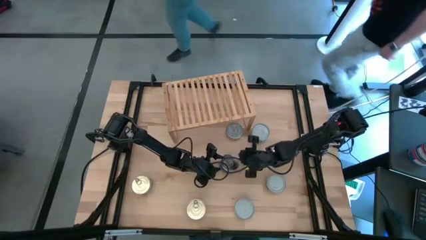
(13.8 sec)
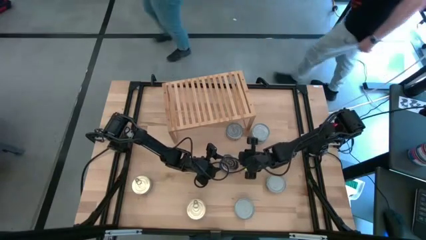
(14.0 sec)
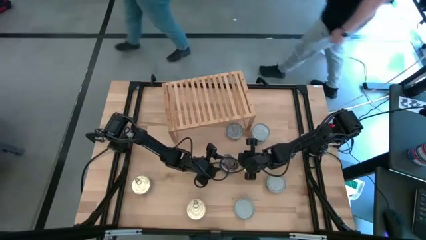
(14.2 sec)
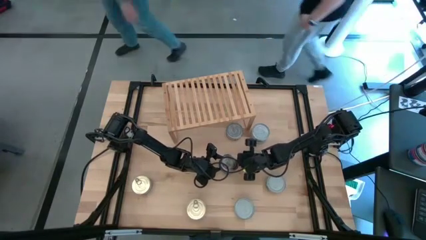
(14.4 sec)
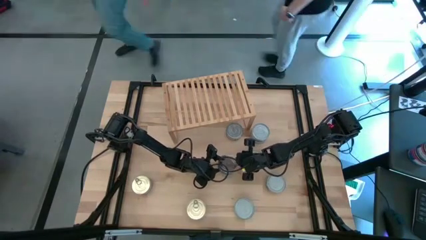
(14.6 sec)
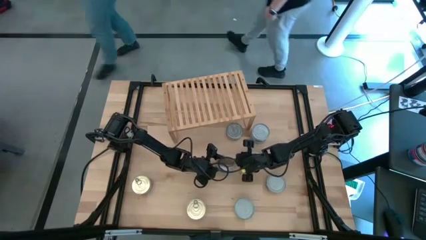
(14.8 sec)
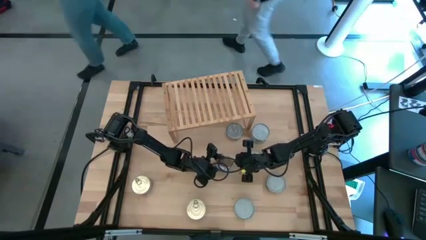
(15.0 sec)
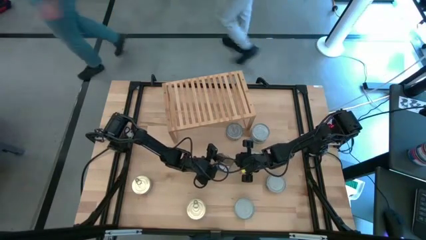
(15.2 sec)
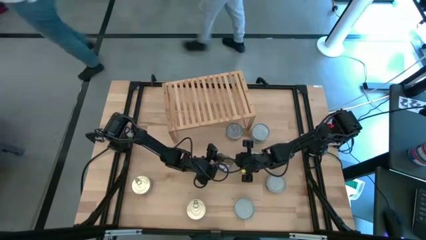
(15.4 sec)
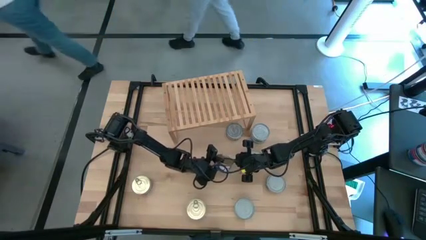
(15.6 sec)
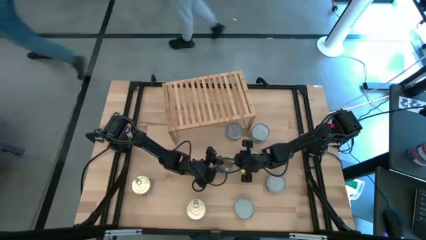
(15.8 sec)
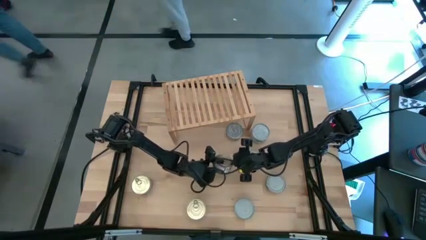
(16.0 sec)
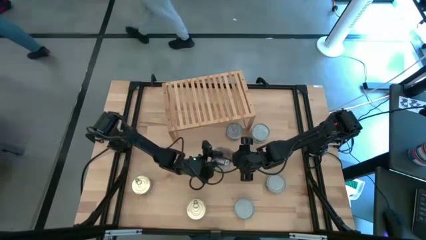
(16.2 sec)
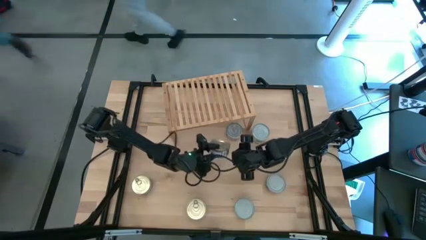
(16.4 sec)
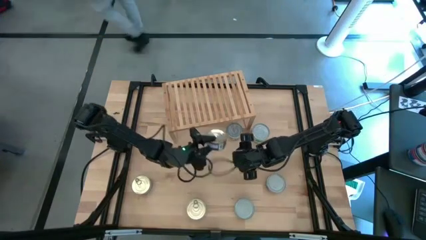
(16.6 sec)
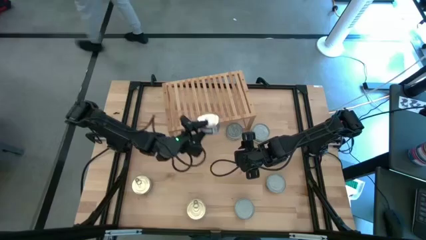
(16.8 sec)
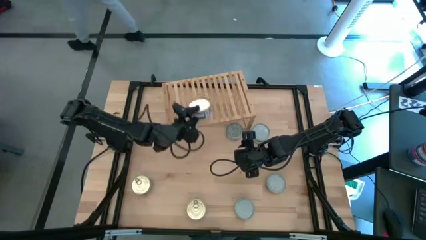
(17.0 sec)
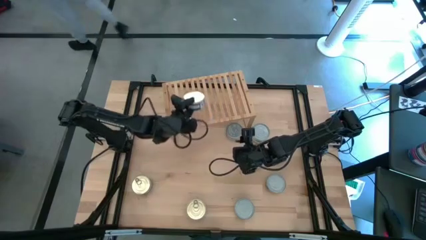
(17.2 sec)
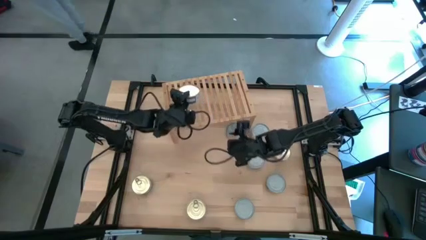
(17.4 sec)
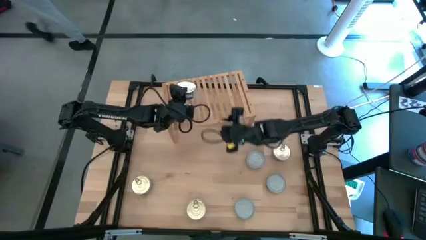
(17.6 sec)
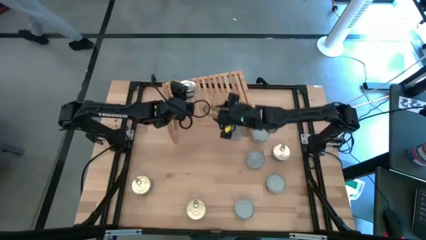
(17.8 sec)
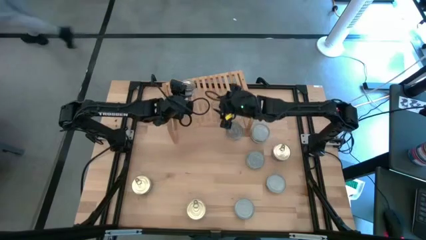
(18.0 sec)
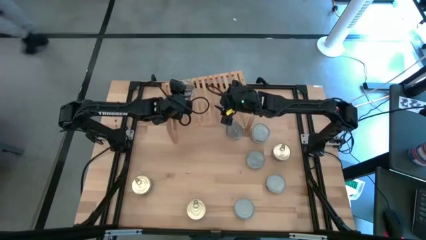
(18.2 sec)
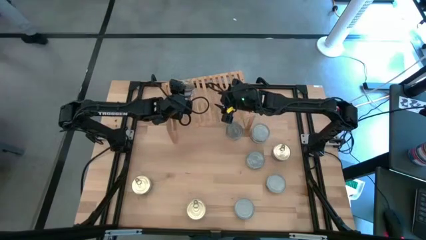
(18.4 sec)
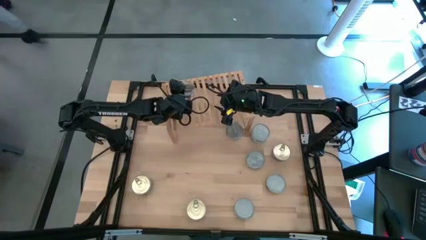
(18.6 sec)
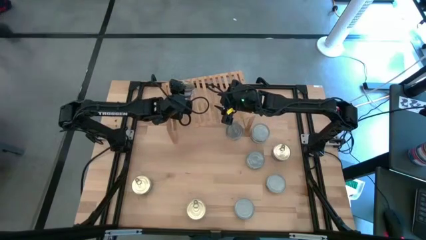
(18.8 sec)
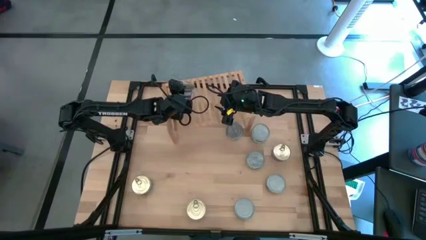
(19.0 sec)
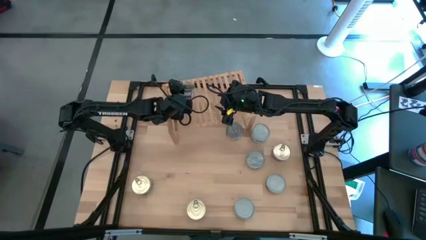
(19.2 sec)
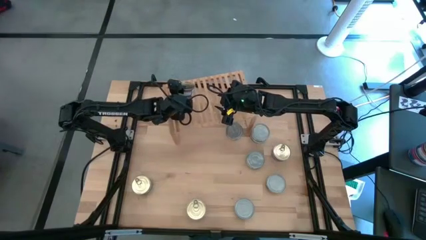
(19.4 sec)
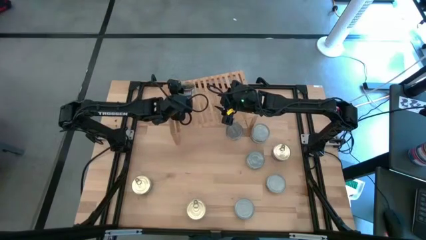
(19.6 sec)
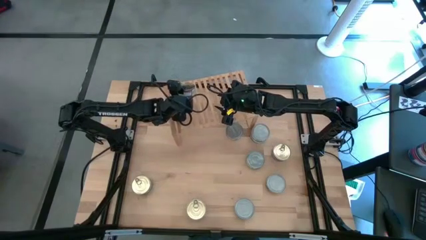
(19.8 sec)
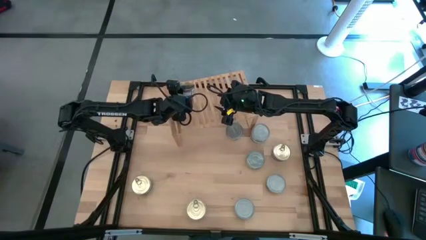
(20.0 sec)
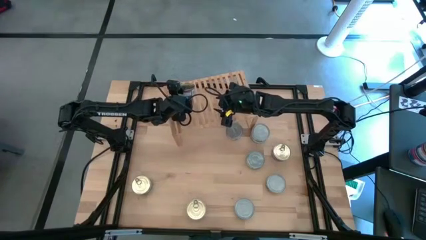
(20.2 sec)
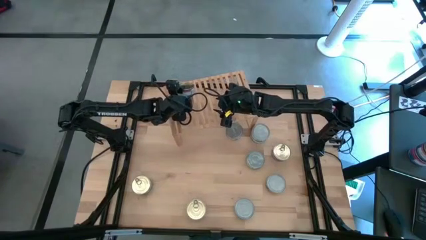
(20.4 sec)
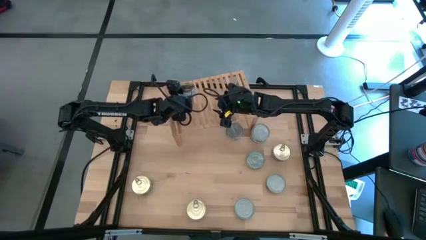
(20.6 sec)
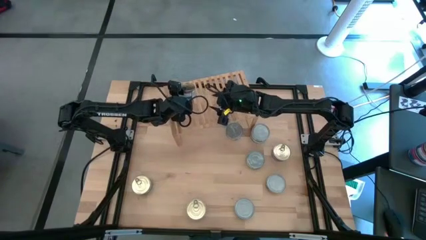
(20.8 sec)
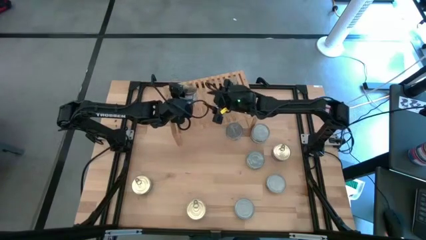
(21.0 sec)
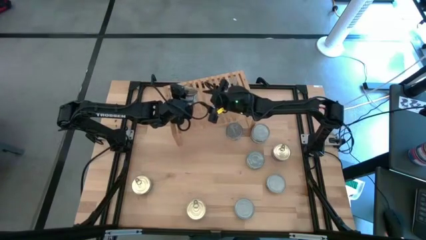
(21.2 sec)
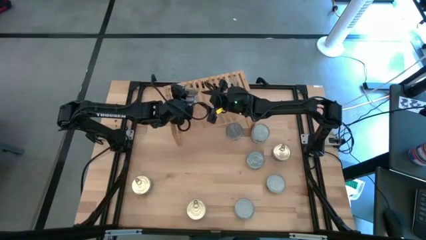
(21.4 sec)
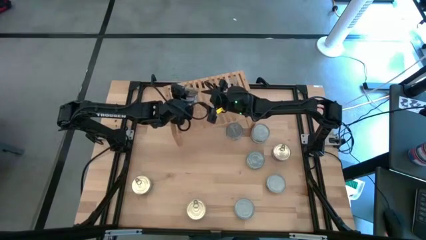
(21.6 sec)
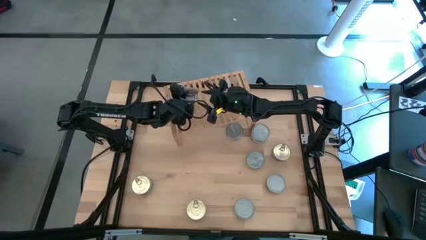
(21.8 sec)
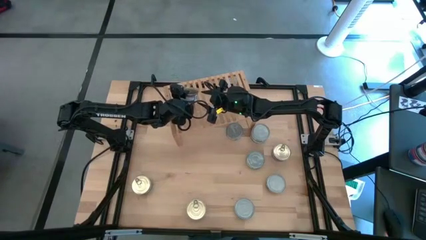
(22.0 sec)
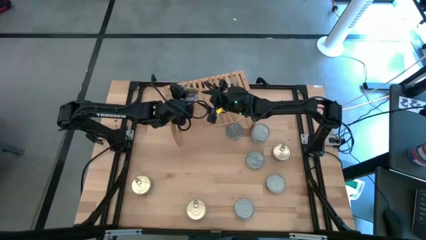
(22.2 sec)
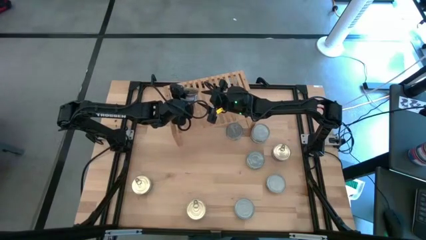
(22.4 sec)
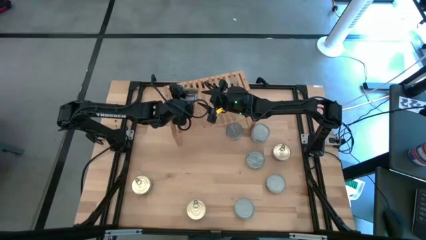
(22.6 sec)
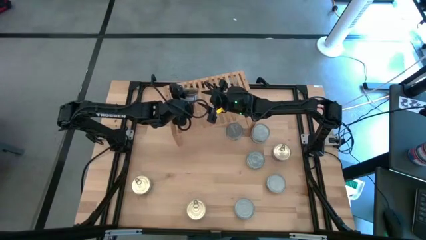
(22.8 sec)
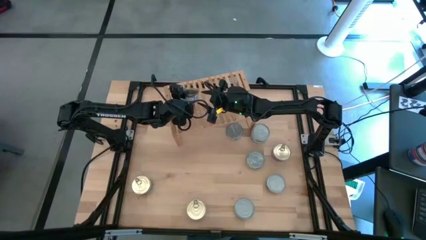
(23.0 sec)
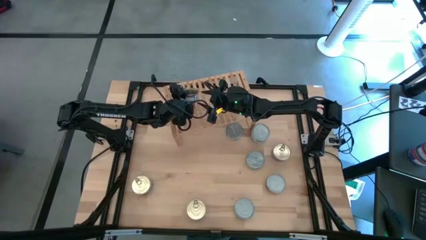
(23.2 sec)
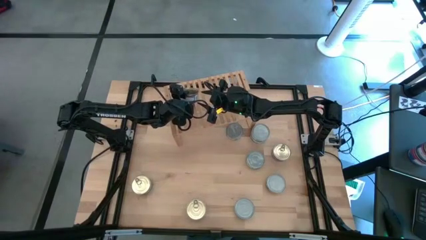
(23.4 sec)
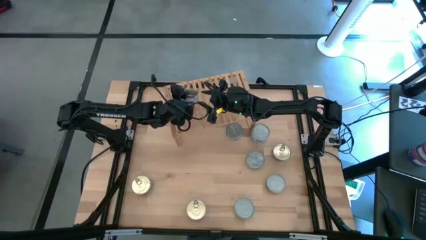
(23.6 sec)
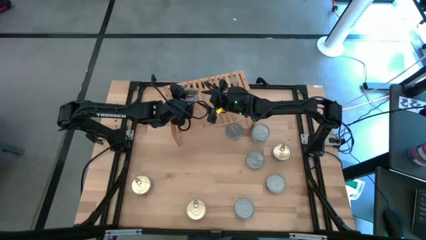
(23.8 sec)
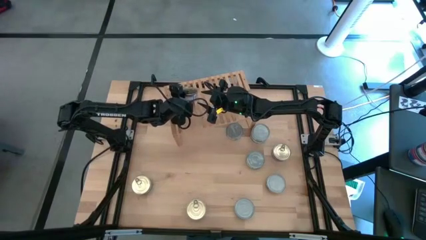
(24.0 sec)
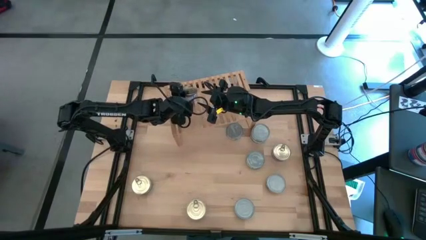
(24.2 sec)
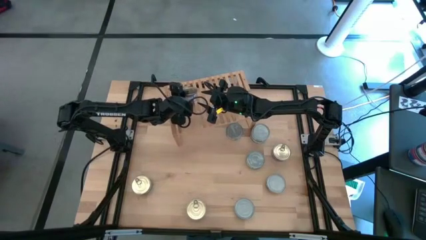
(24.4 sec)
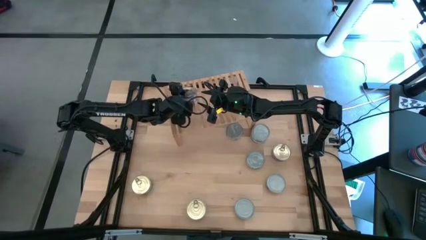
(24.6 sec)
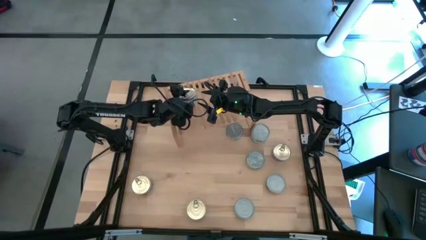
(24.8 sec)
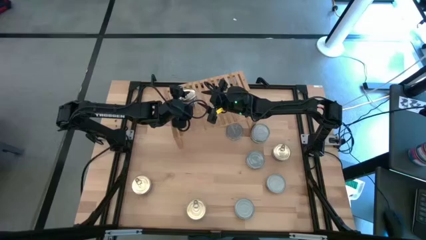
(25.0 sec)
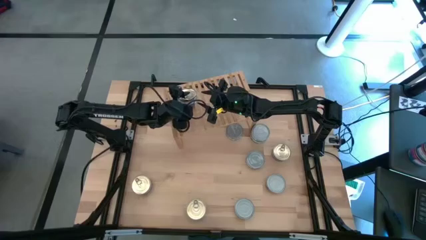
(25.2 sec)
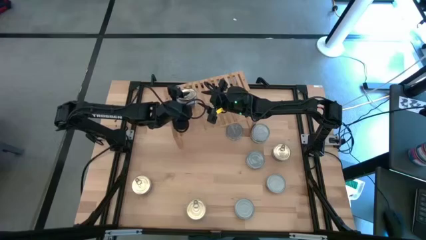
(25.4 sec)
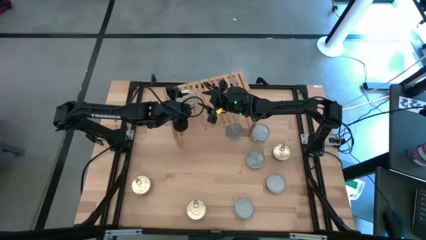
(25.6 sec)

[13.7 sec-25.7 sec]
Task: Stack canned seafood by type on shelf
Put the blue tuna can on the shelf
